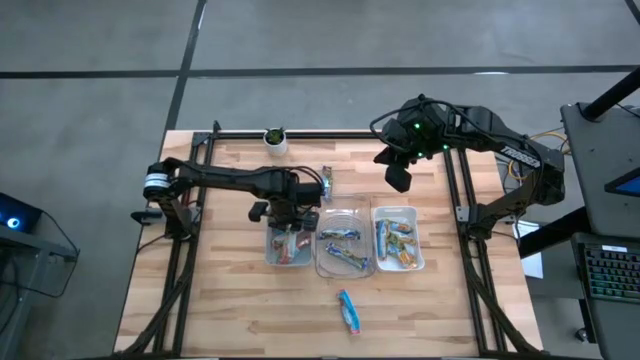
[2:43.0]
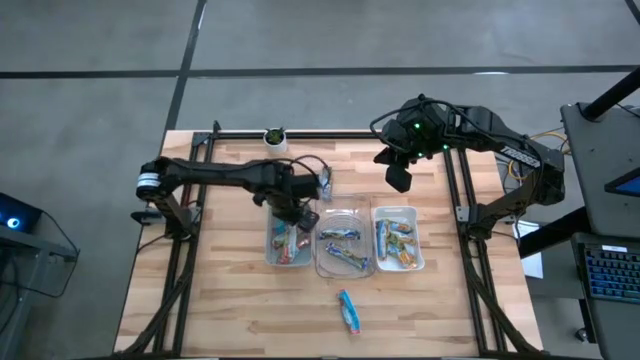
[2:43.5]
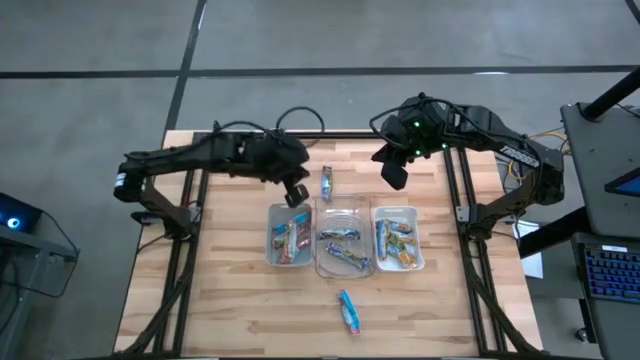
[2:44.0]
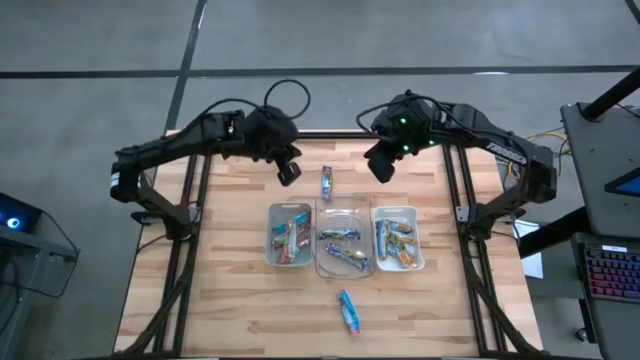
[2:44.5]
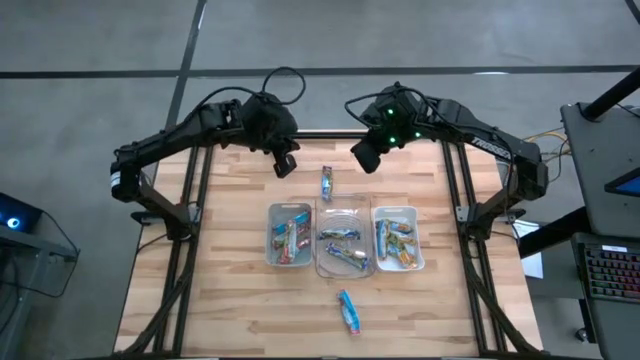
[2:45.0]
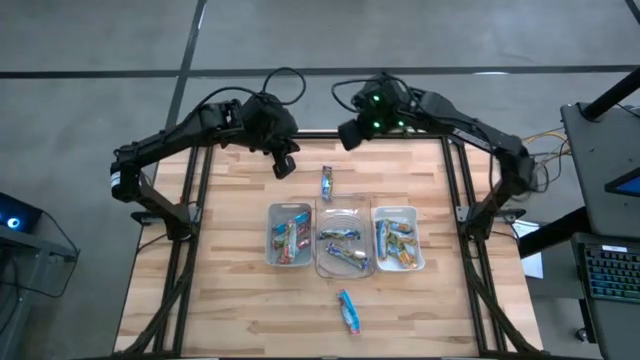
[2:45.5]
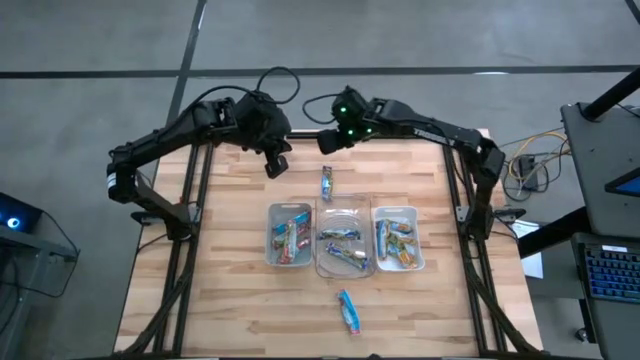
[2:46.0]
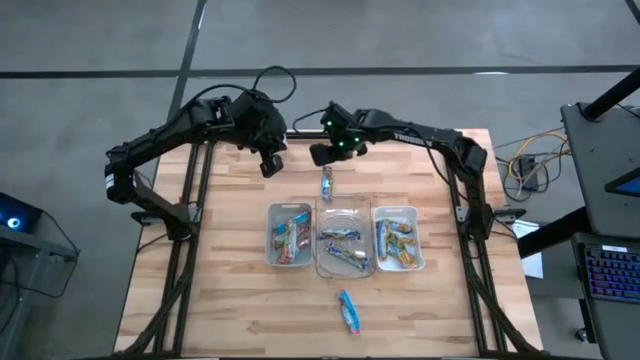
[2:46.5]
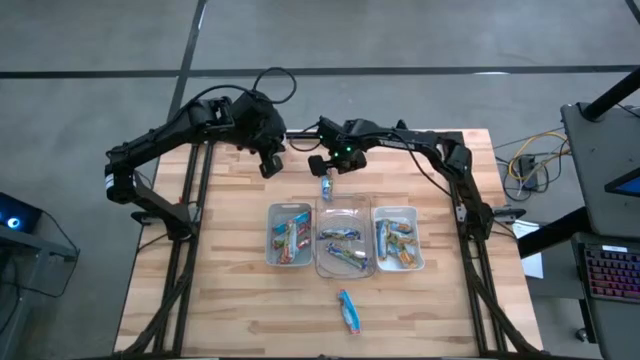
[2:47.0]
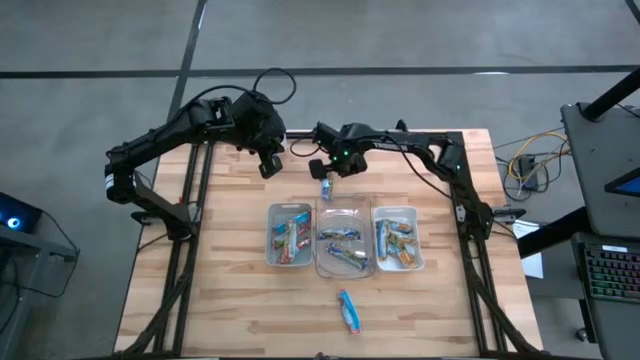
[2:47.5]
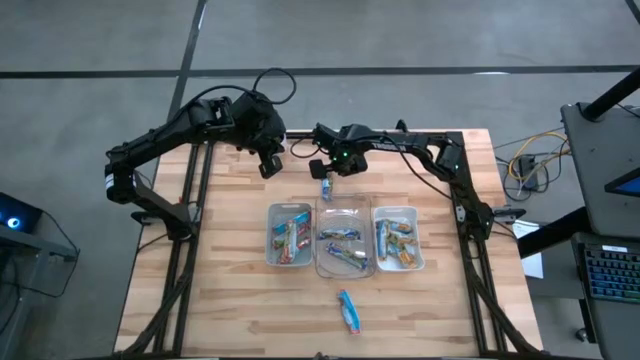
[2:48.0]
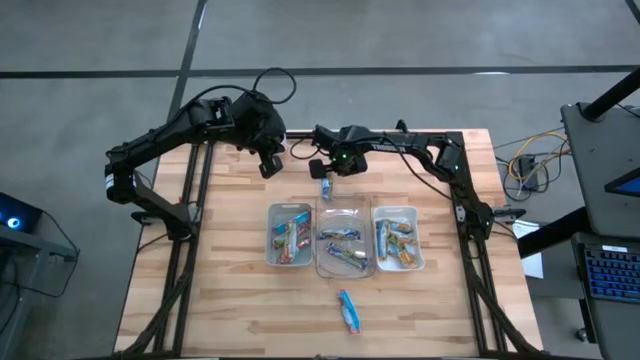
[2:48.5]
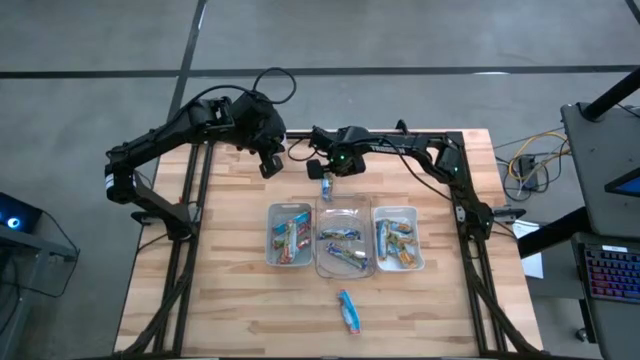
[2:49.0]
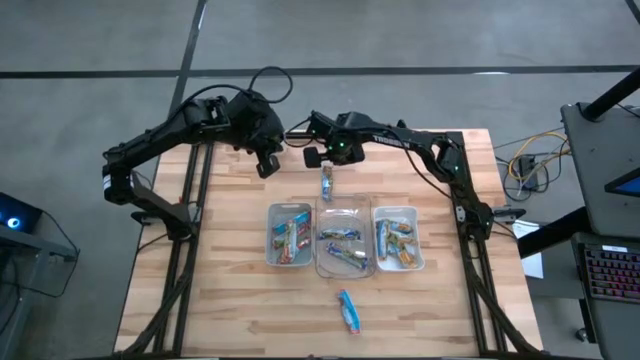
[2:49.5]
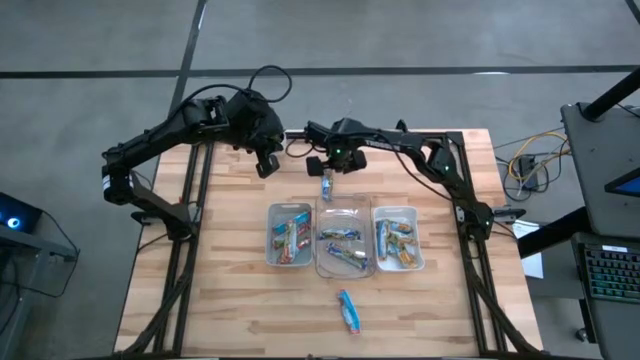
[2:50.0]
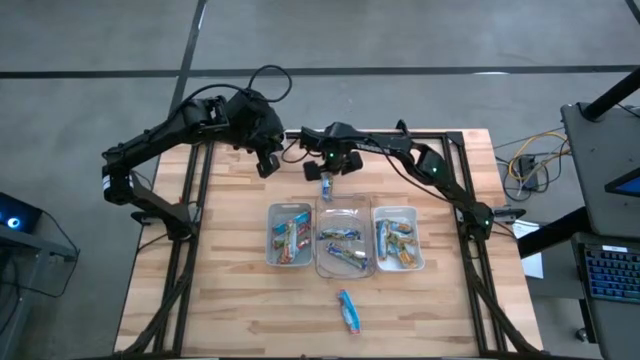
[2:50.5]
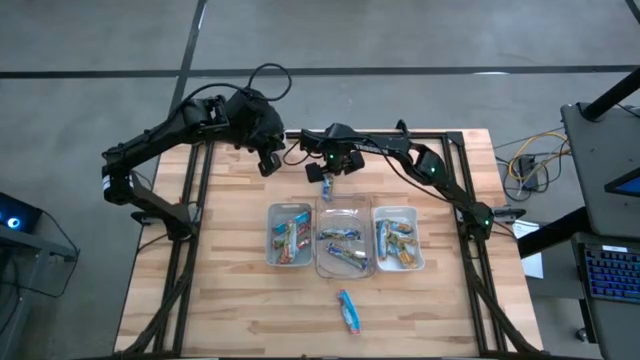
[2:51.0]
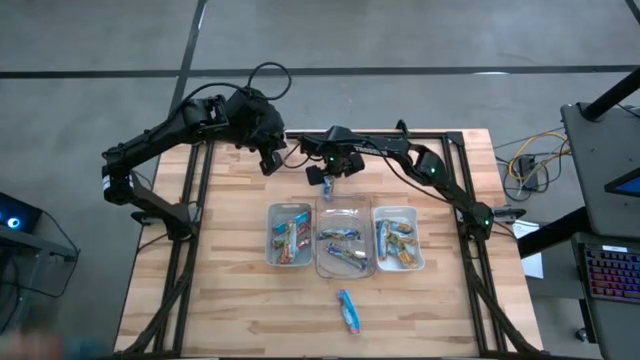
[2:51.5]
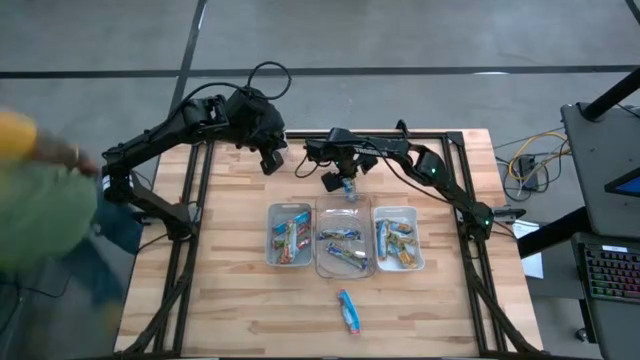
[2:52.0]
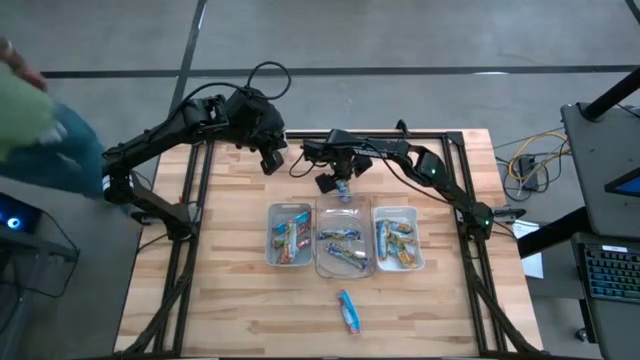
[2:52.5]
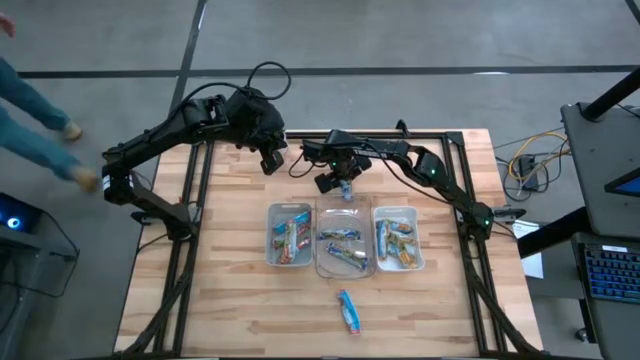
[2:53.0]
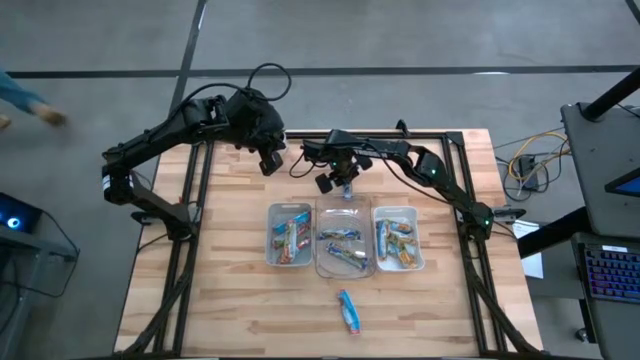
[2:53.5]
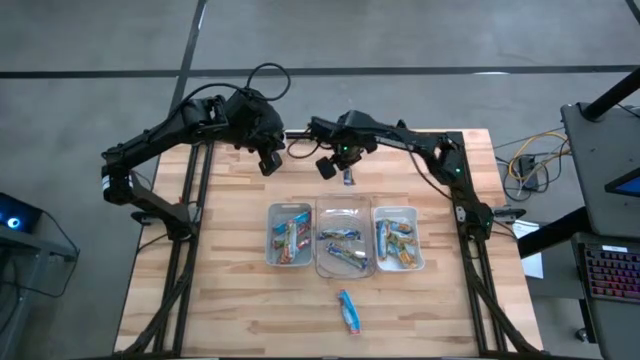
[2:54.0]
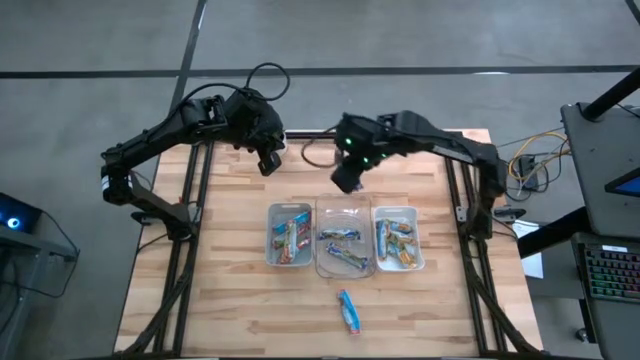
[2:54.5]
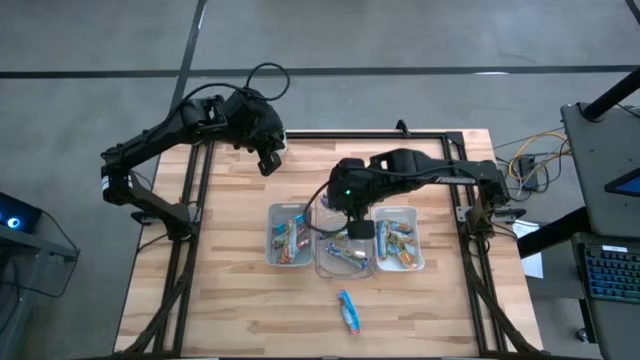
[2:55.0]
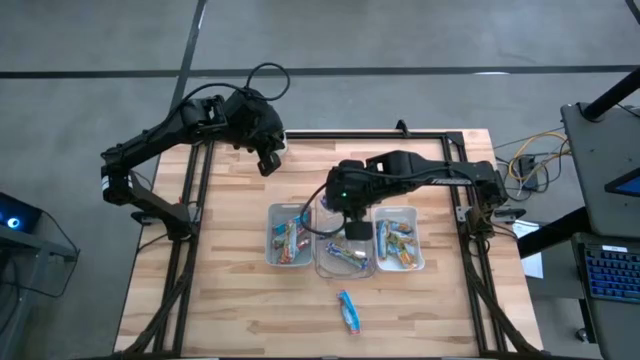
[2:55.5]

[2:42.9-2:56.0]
Task: Pick and place Granola Bars by type
Put the blue granola bar into the transparent bin

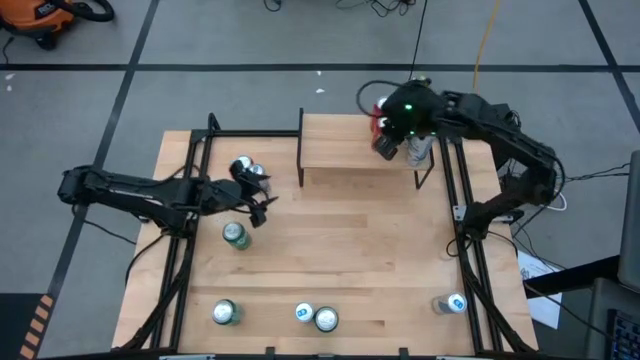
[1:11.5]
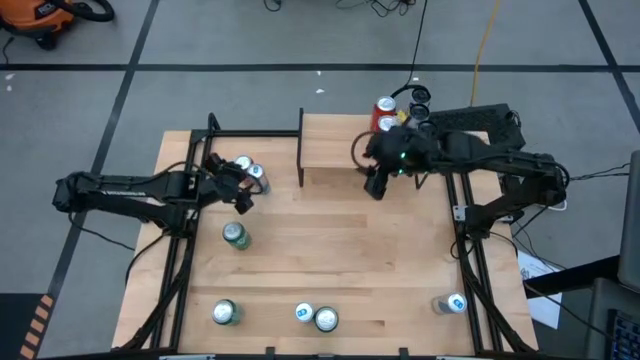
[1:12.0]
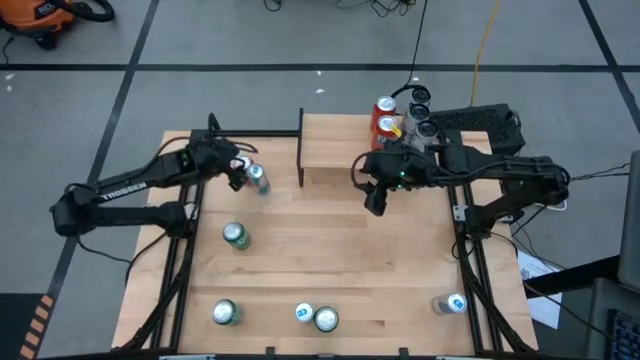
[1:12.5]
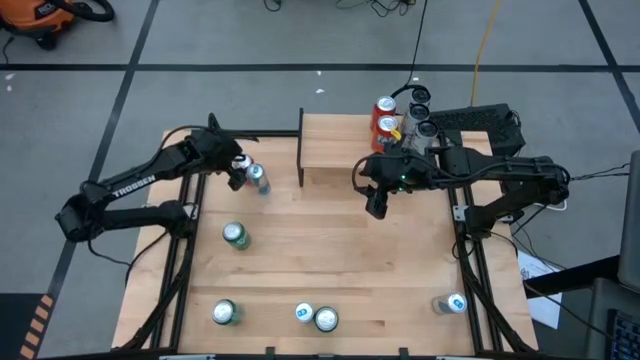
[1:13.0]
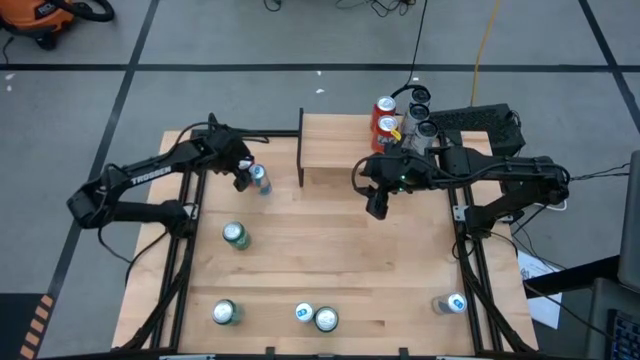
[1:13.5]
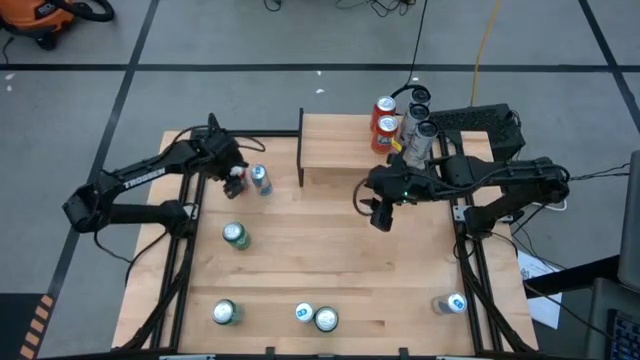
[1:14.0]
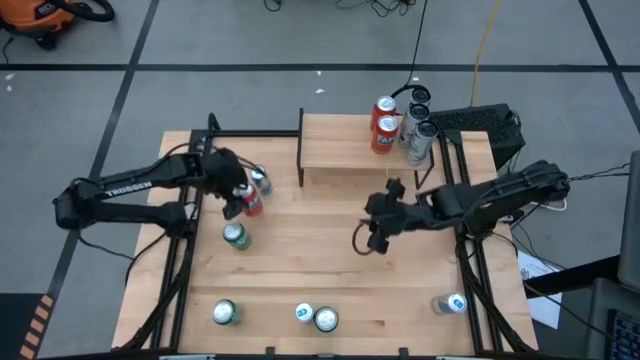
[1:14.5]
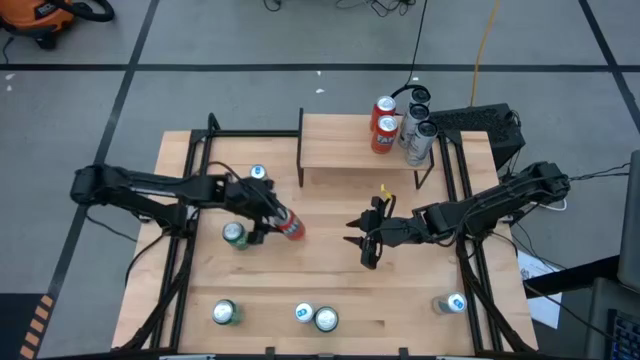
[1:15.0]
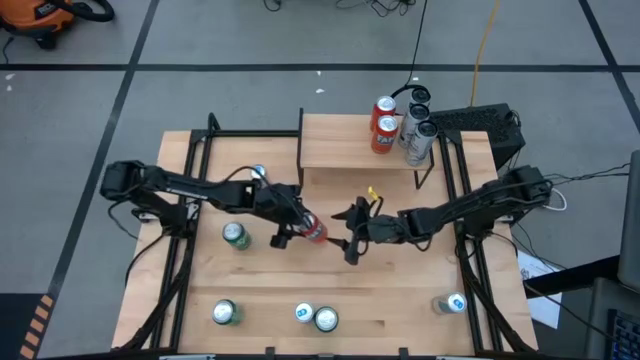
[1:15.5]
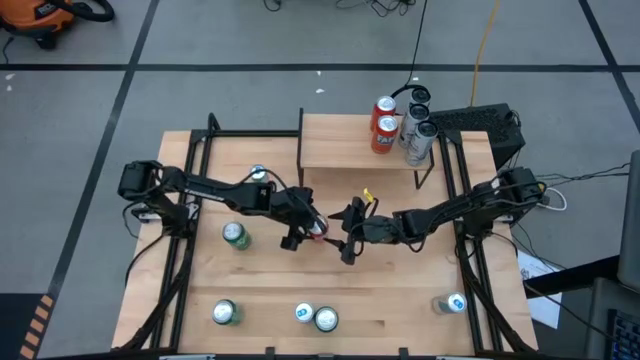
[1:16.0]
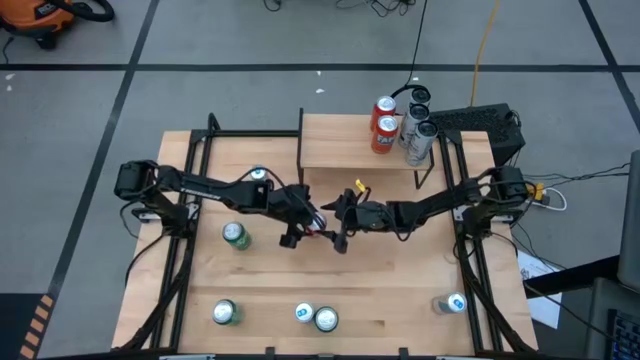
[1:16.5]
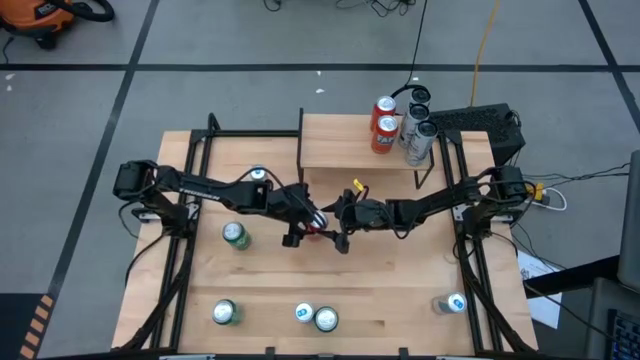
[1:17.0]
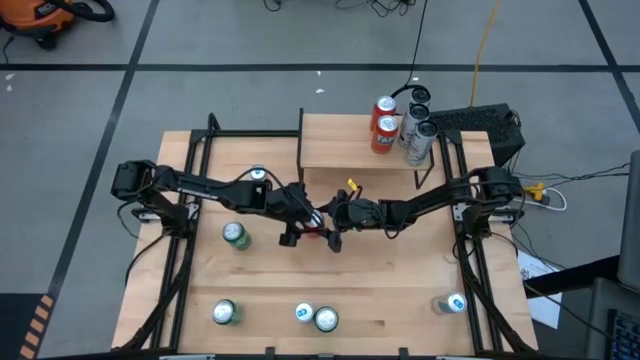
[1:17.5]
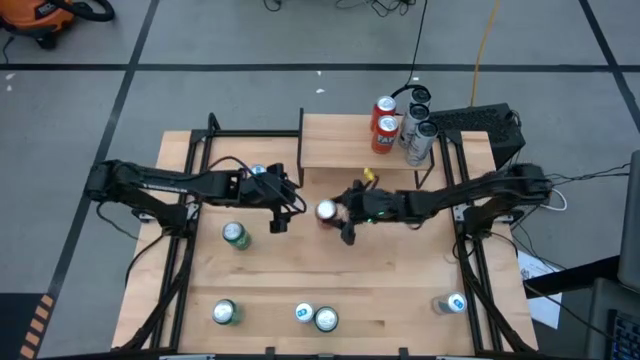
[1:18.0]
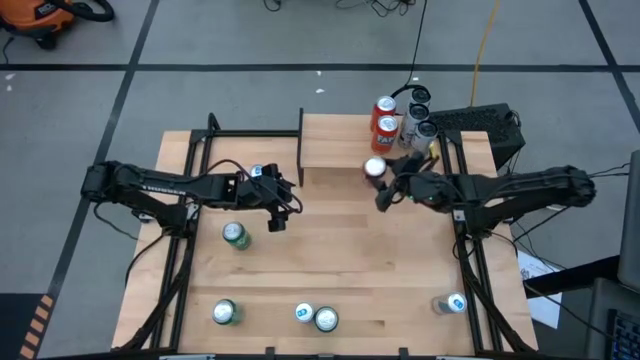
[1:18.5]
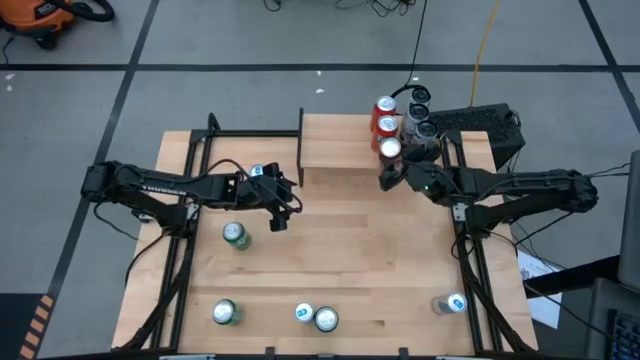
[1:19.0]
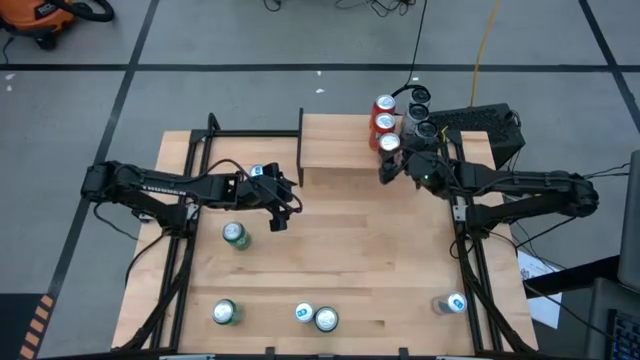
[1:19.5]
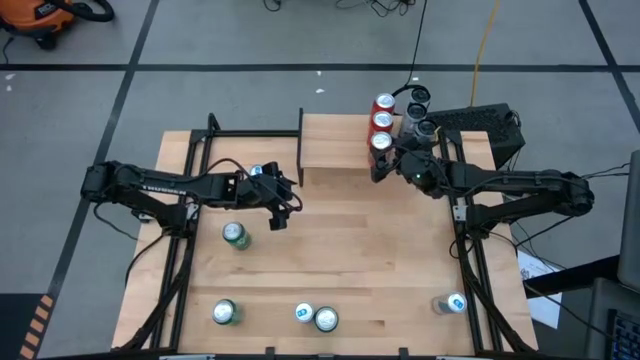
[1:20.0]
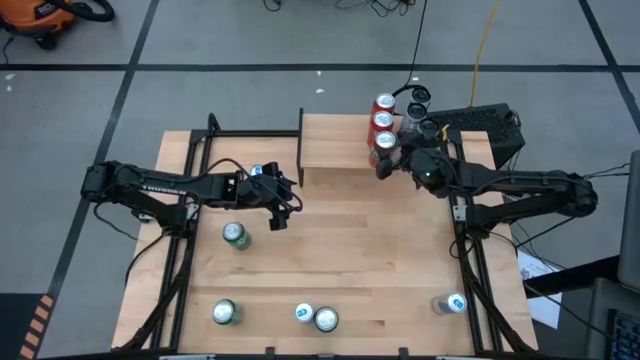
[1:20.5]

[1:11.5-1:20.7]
Task: Place canned beverage on shelf
Put the red soda can on the shelf aligned with the other red soda can
